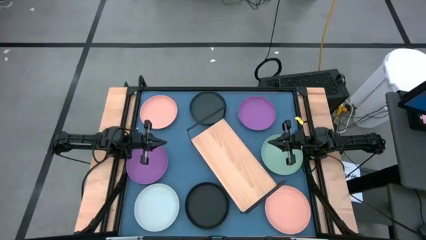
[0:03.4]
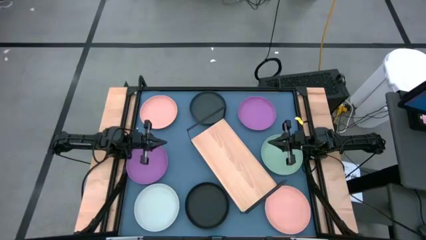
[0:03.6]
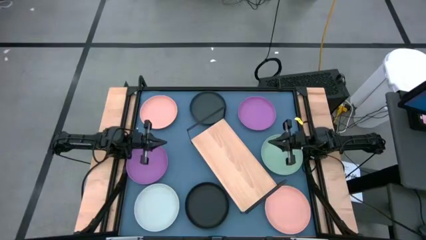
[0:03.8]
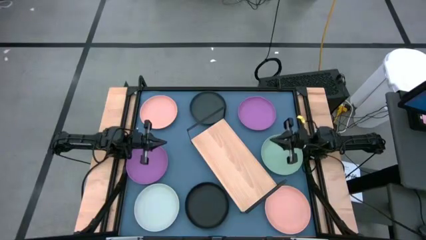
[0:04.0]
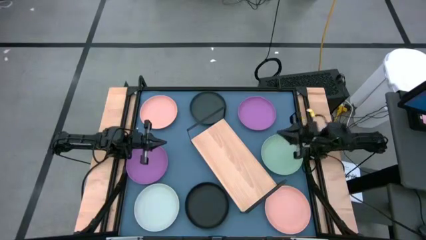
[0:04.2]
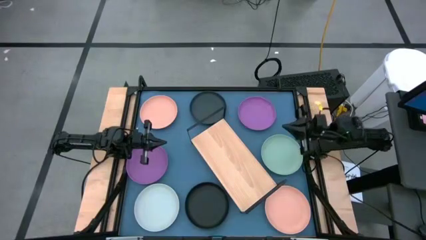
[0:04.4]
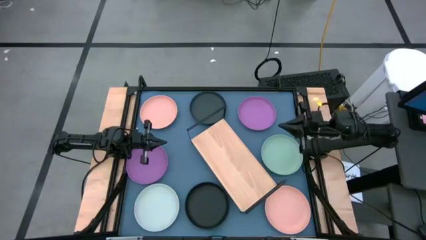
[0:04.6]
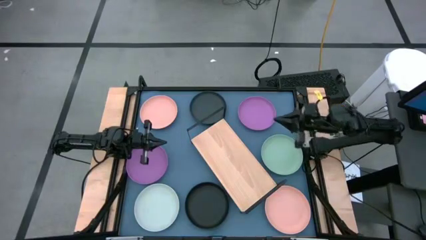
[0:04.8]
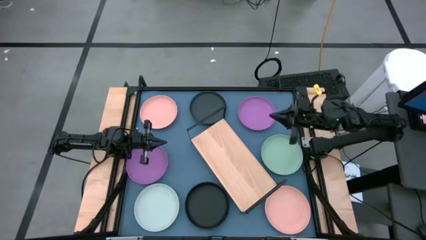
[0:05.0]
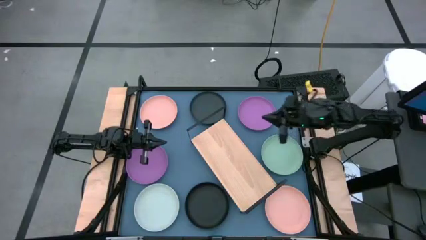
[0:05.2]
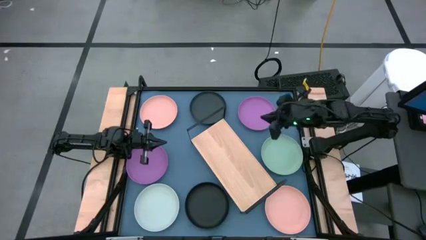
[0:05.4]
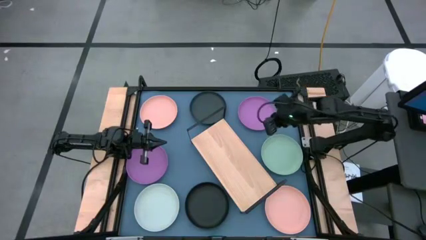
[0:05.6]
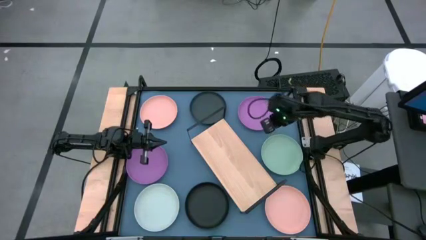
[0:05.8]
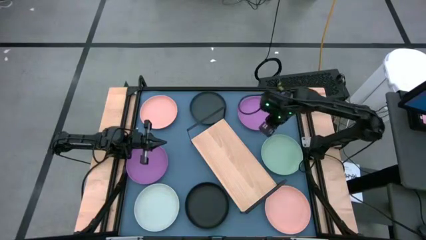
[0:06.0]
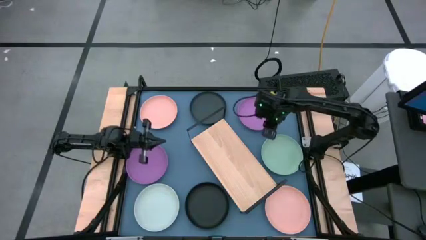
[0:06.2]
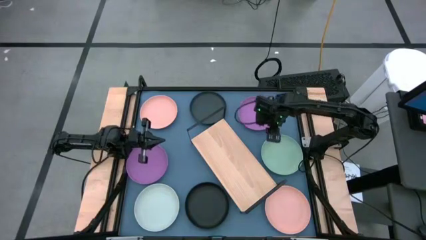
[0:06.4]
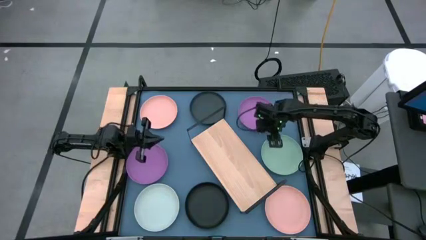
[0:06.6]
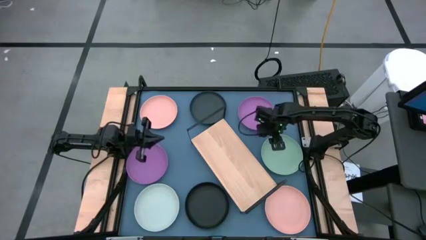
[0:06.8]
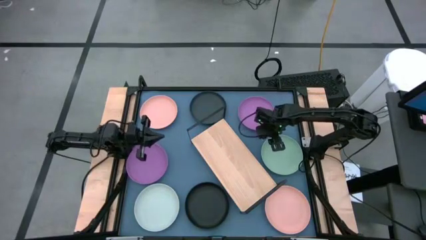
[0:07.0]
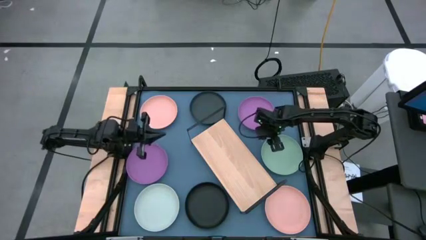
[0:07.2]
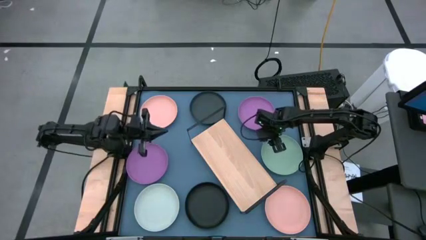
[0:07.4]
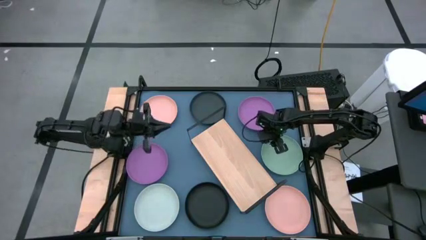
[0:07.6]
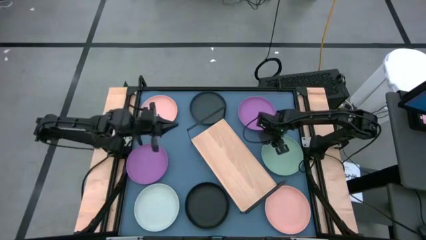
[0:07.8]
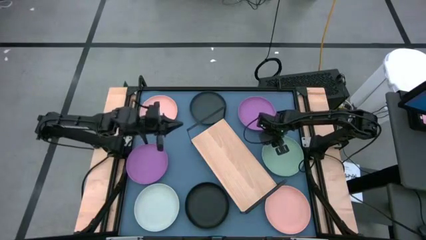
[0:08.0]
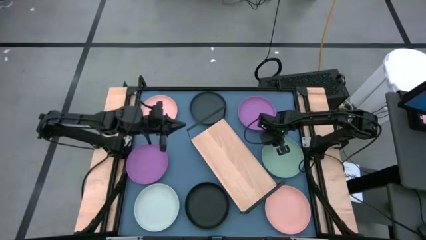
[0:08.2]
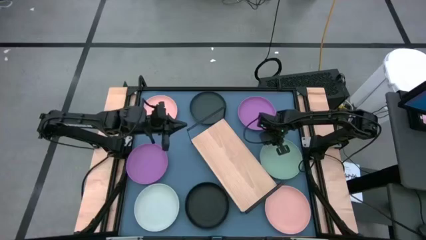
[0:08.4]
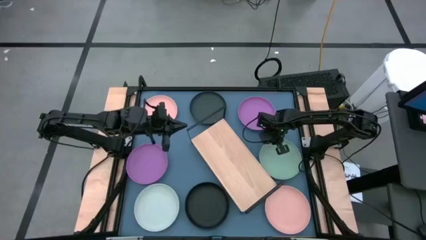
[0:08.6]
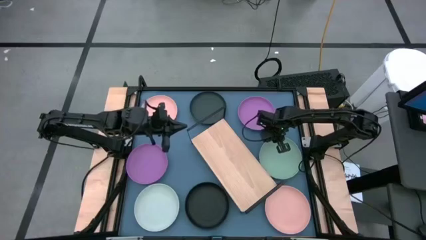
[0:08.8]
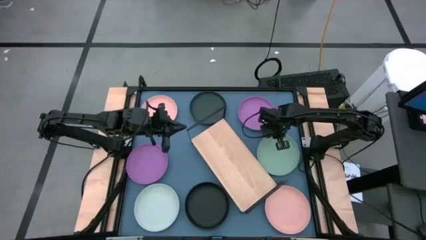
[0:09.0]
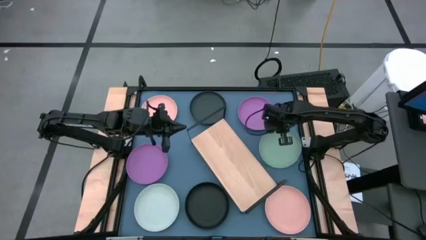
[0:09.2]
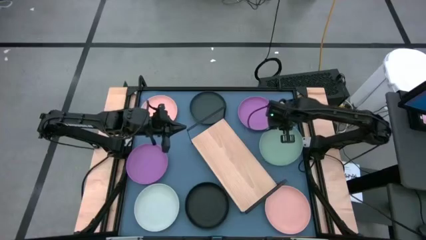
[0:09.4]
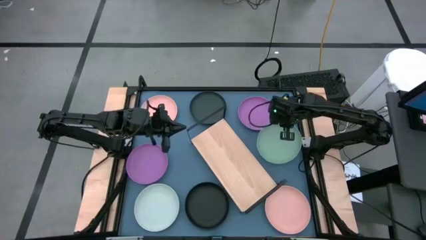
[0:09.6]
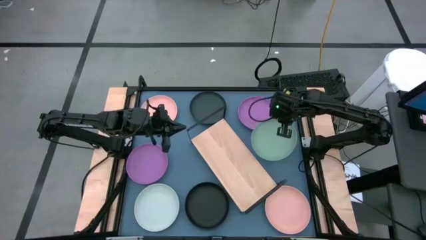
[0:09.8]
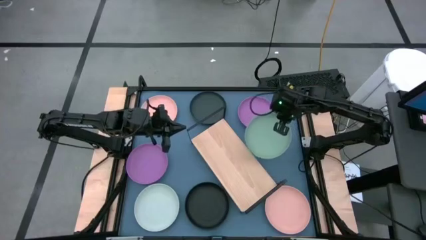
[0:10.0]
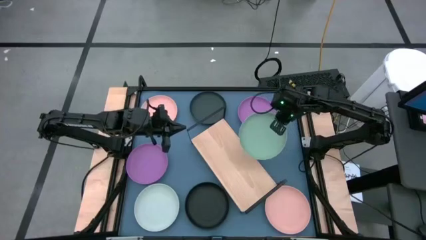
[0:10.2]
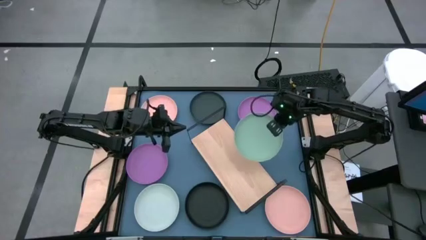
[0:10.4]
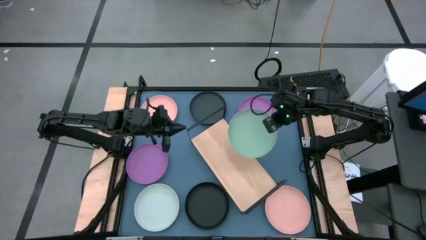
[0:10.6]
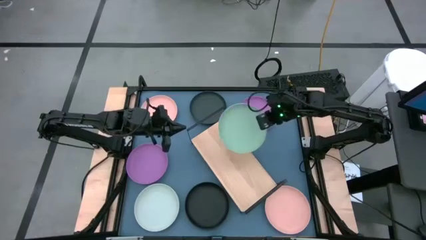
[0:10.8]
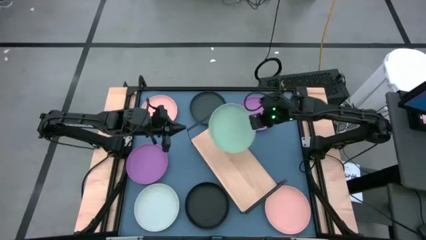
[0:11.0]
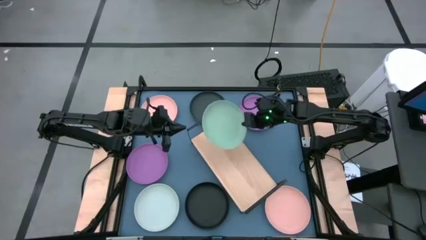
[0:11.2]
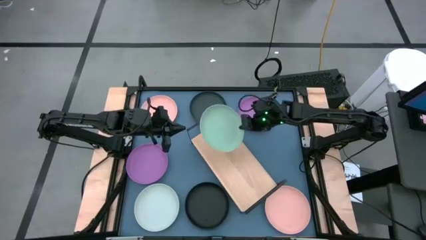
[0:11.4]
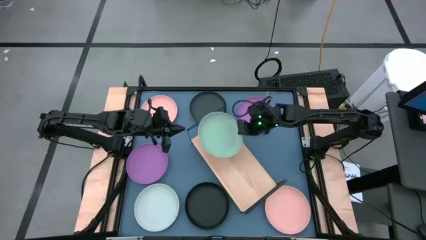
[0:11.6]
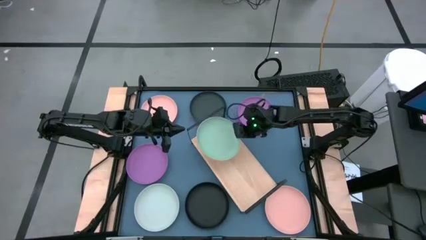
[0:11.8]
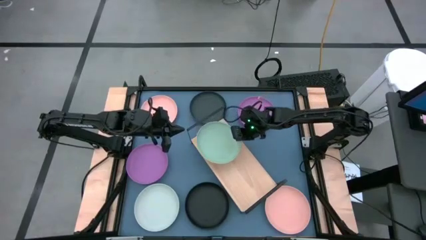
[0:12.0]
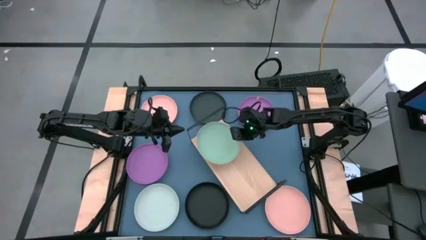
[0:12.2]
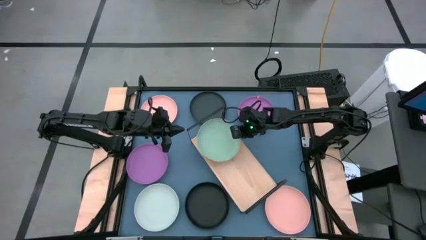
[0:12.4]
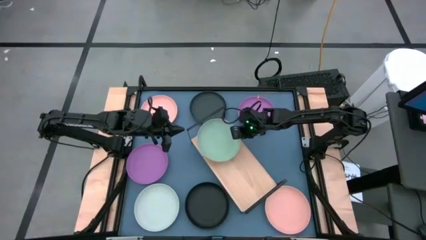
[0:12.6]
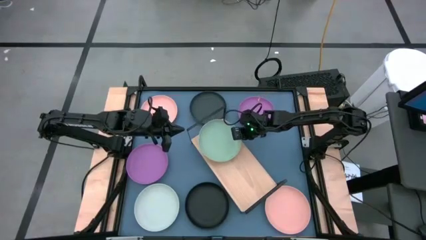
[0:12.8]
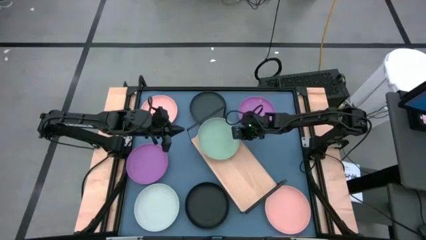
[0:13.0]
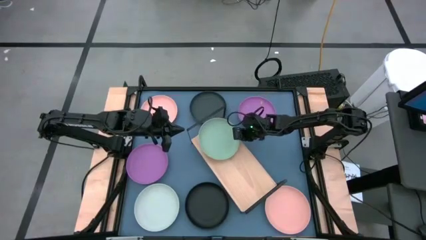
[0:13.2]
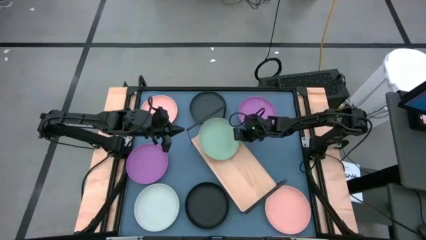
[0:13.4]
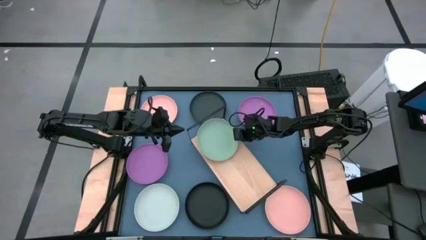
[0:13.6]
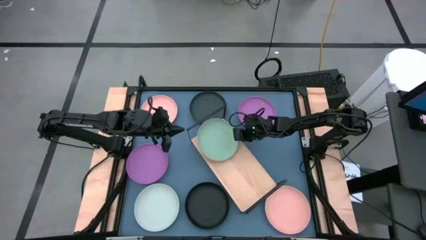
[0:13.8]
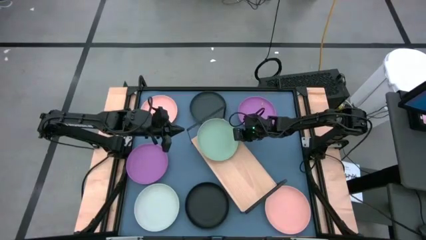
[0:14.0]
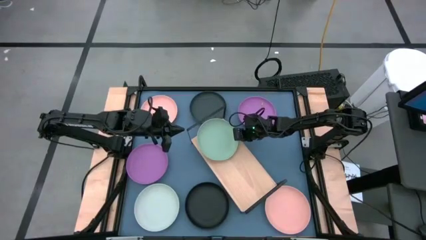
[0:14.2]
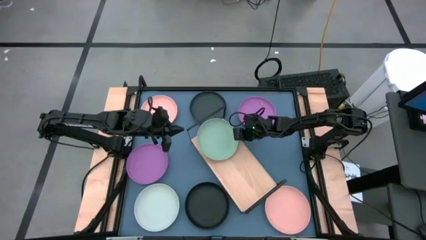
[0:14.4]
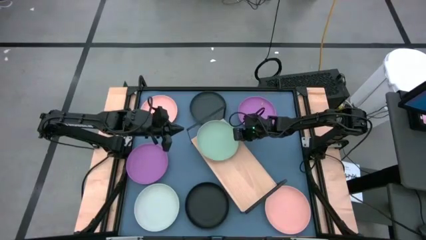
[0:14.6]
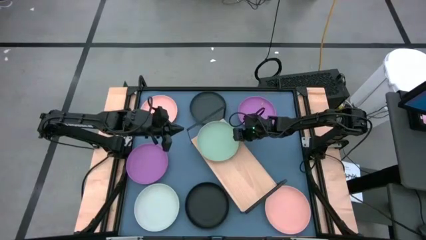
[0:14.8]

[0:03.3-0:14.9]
Task: Place and stack plates onto a shelf
Put the green plate on the shelf

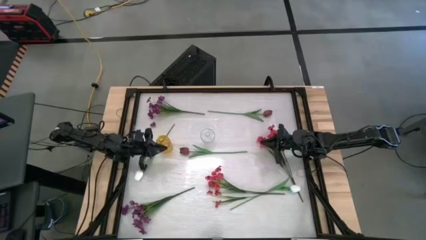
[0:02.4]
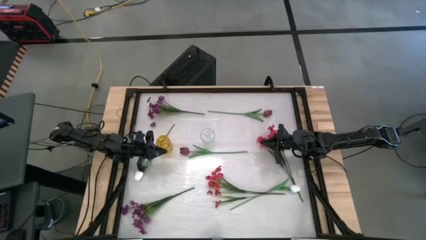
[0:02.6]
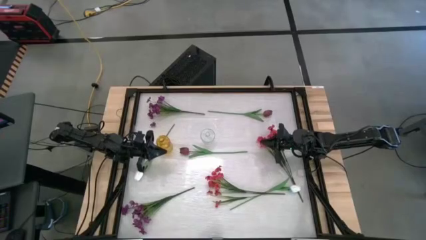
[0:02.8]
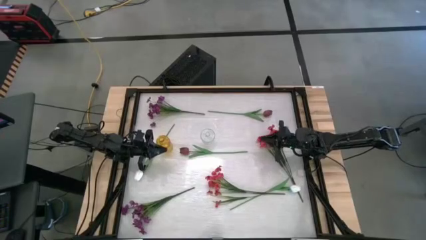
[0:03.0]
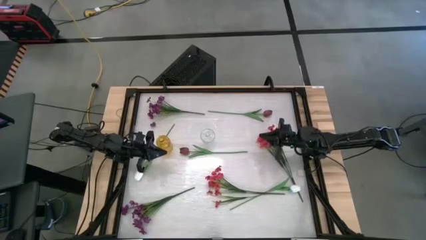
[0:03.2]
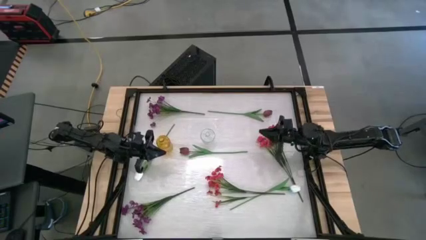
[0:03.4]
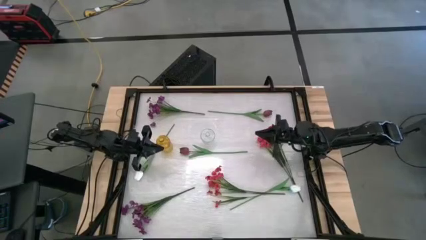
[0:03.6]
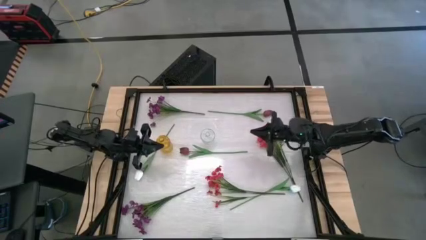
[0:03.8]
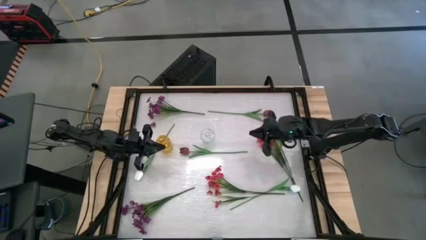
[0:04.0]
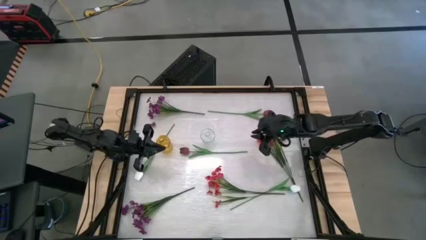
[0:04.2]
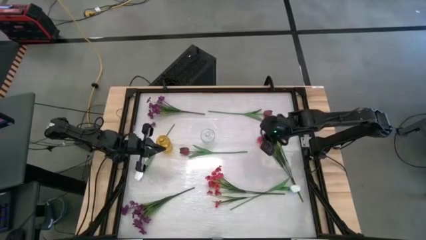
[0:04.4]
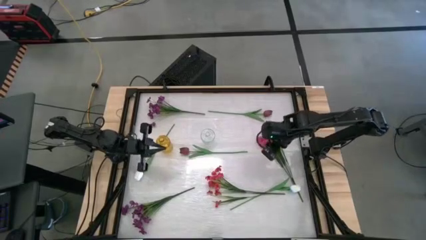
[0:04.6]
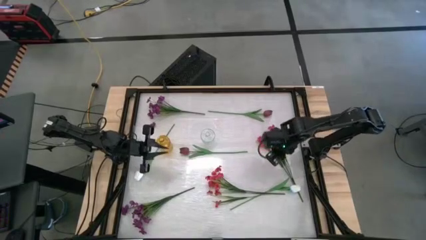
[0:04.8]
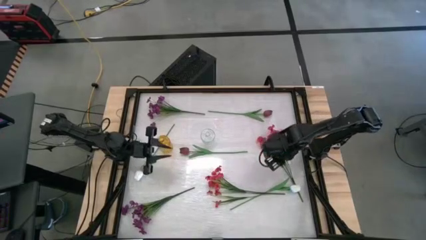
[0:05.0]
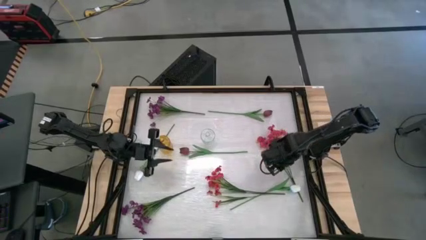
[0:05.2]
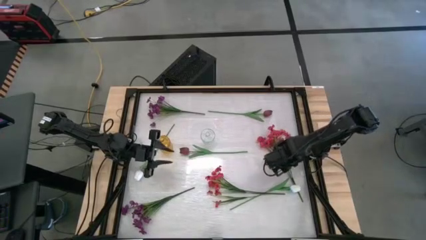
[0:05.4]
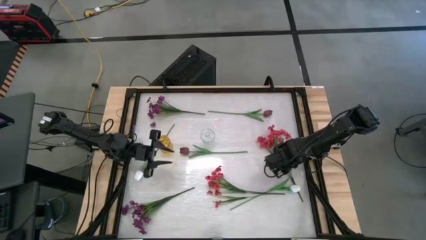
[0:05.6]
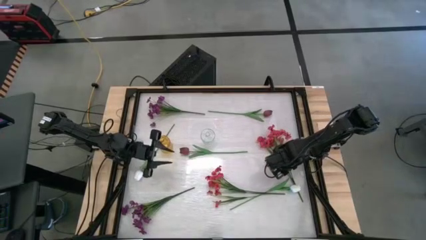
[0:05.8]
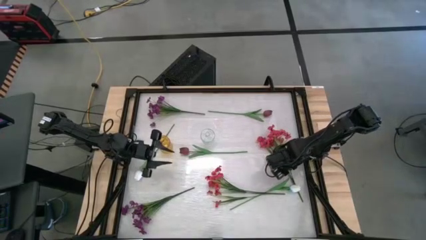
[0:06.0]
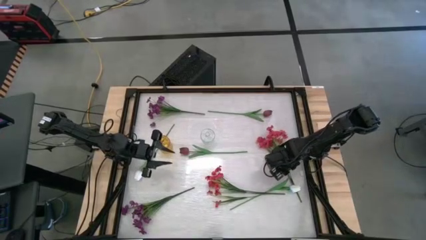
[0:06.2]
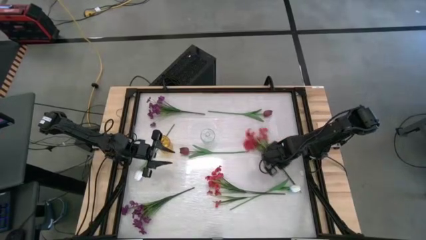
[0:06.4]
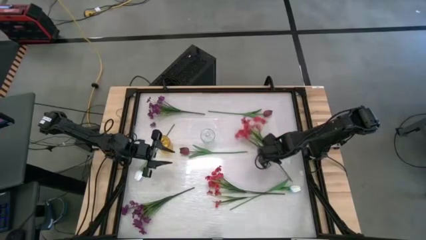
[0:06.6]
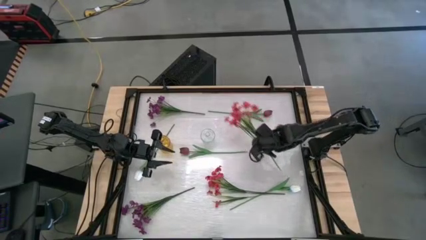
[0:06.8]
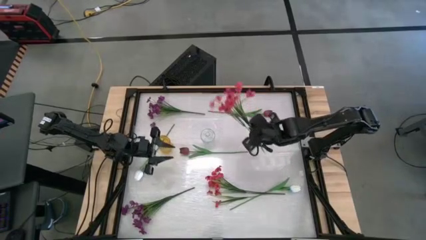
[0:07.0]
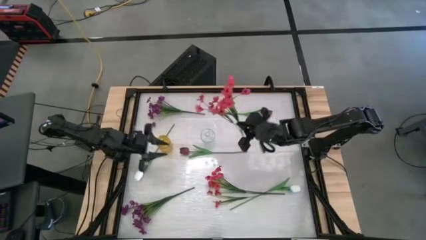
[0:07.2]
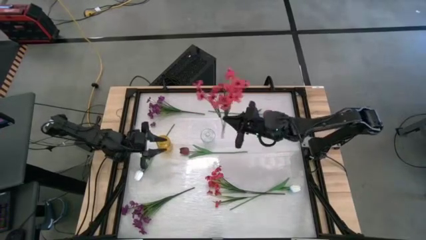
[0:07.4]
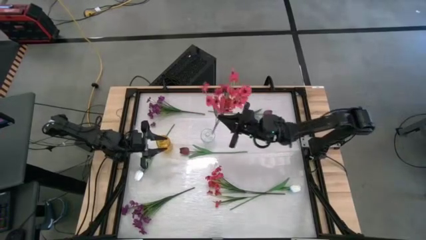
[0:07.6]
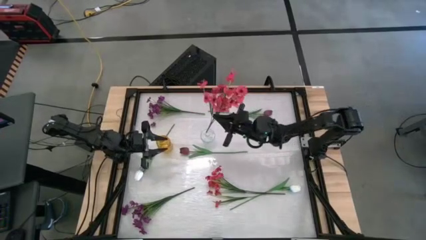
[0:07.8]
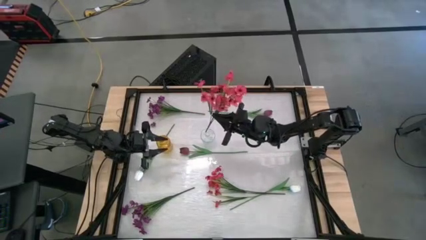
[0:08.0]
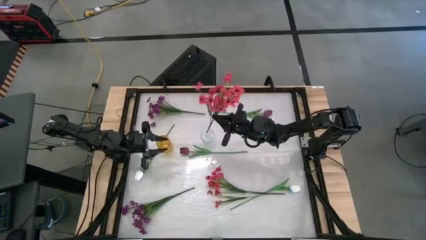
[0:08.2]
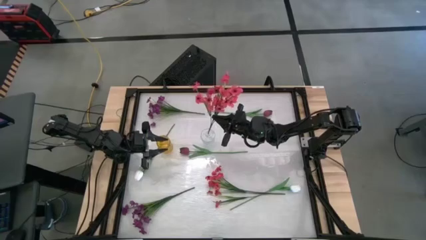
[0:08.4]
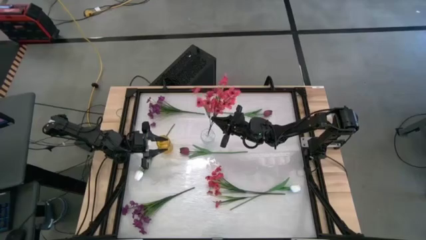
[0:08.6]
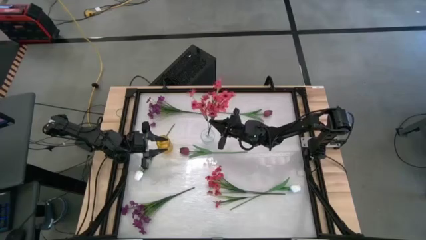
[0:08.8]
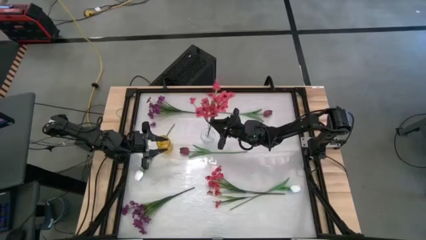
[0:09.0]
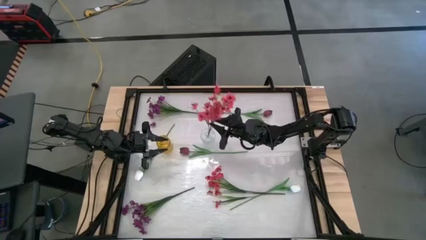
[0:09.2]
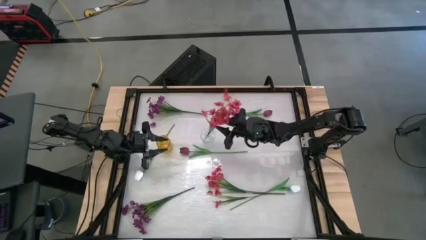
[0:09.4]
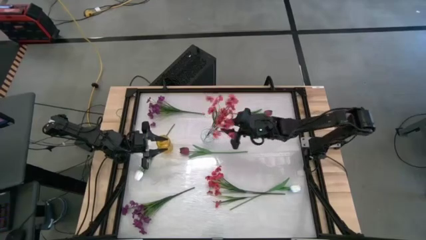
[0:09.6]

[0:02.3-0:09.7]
Task: Sort flowers into vase by color
Put the right red flower into the transparent vase
